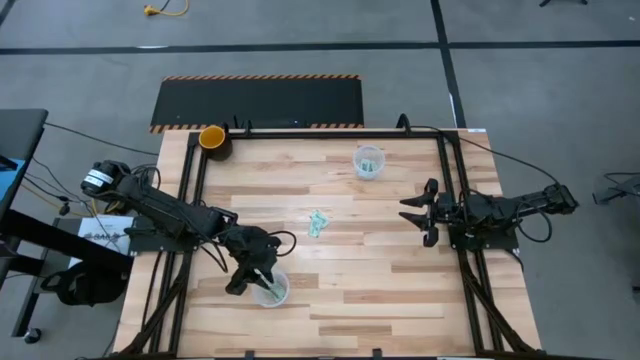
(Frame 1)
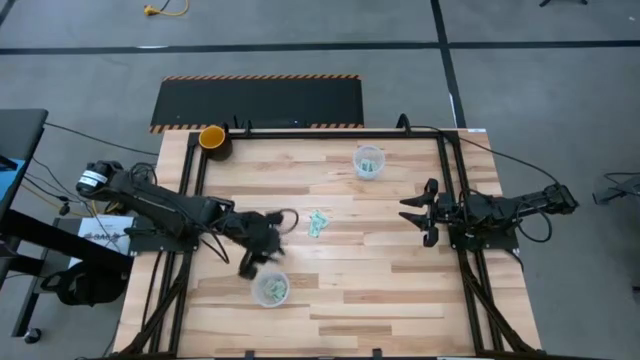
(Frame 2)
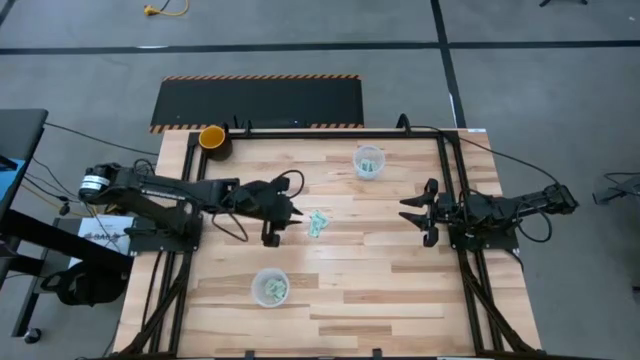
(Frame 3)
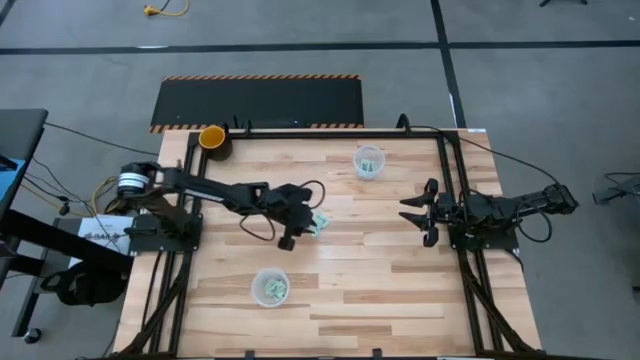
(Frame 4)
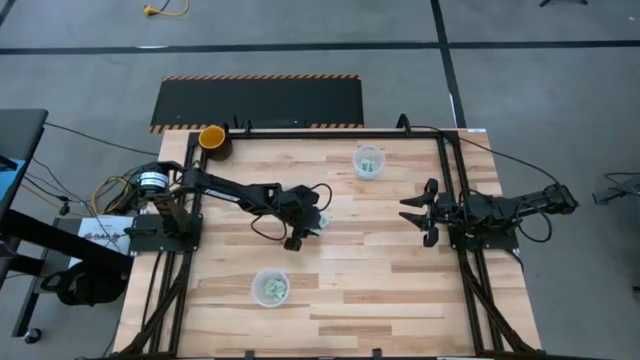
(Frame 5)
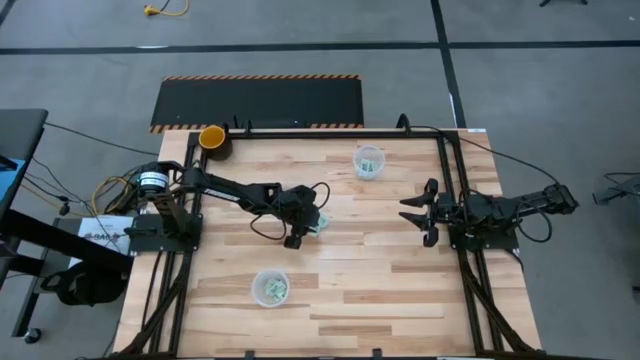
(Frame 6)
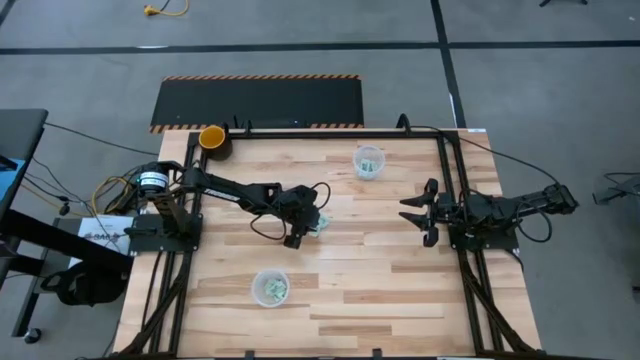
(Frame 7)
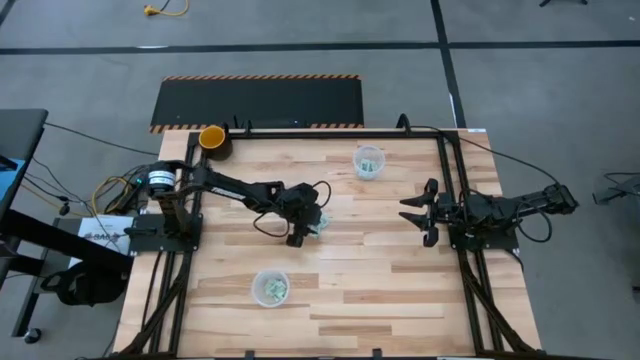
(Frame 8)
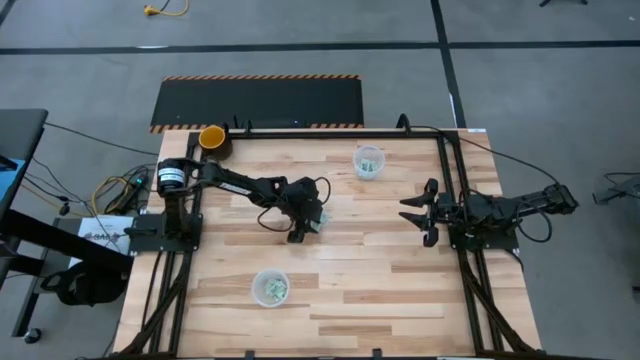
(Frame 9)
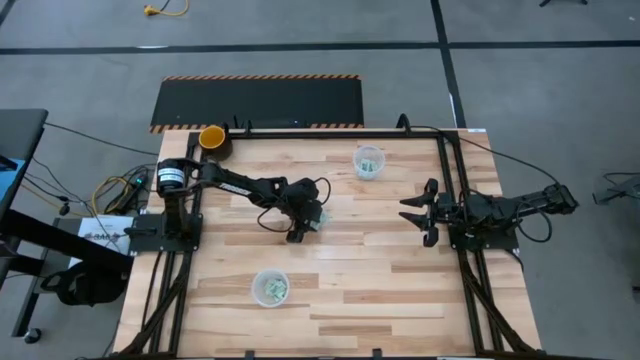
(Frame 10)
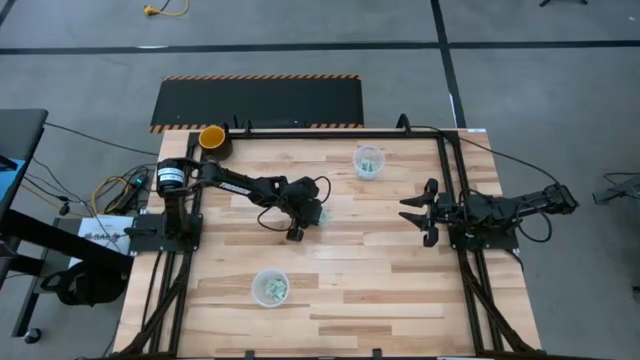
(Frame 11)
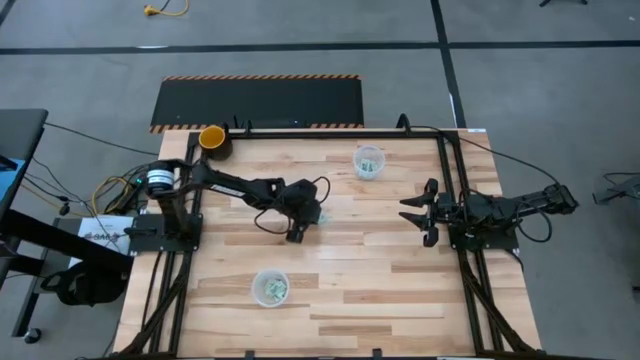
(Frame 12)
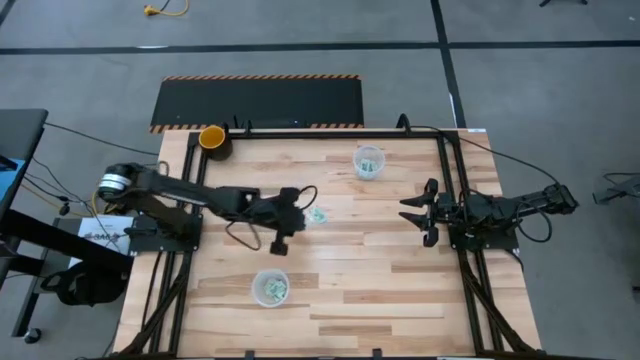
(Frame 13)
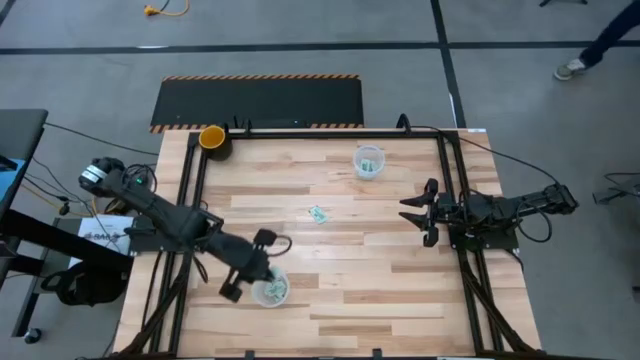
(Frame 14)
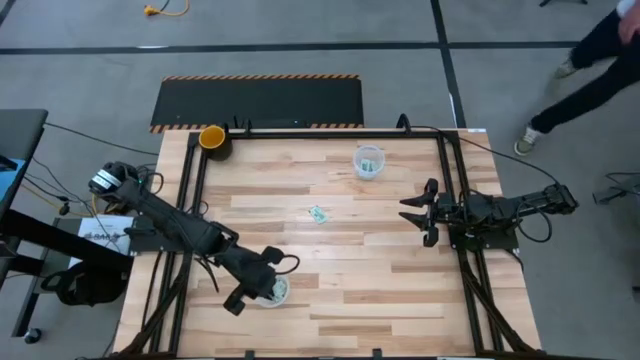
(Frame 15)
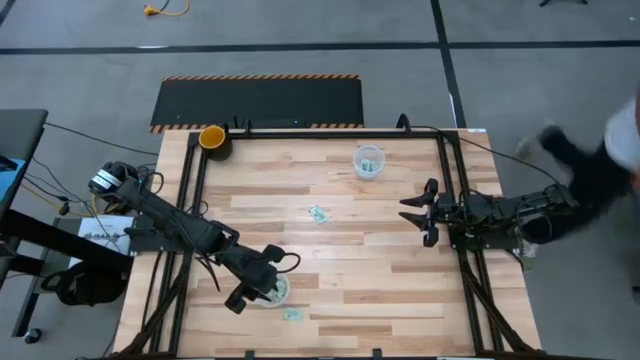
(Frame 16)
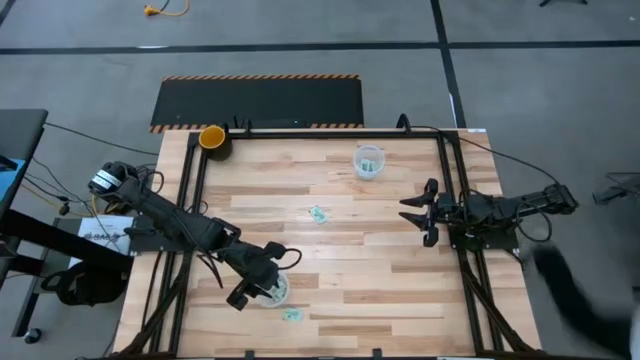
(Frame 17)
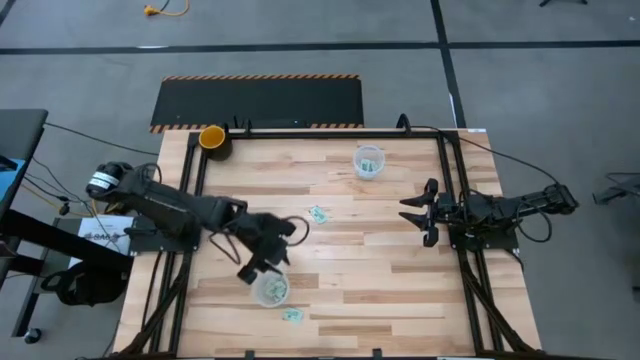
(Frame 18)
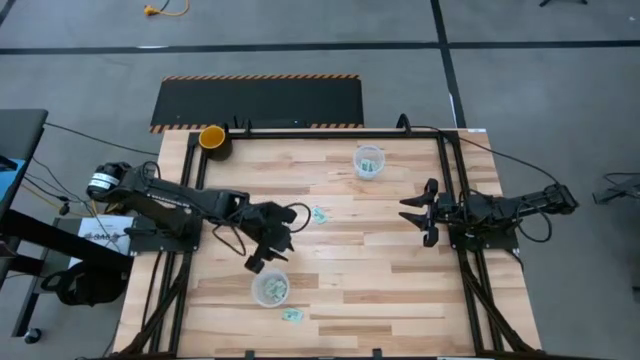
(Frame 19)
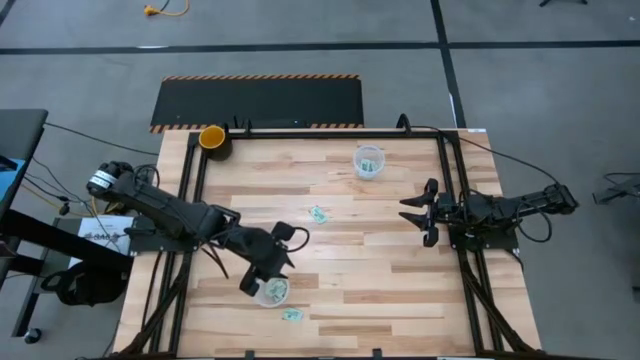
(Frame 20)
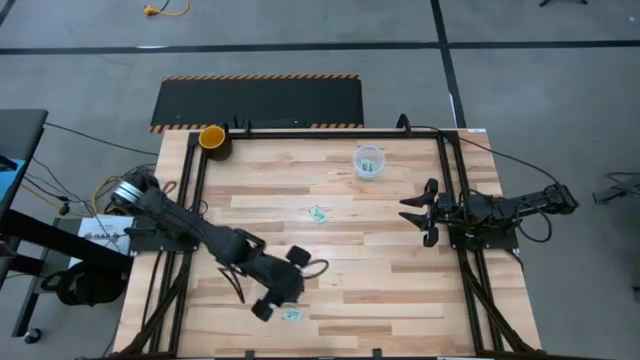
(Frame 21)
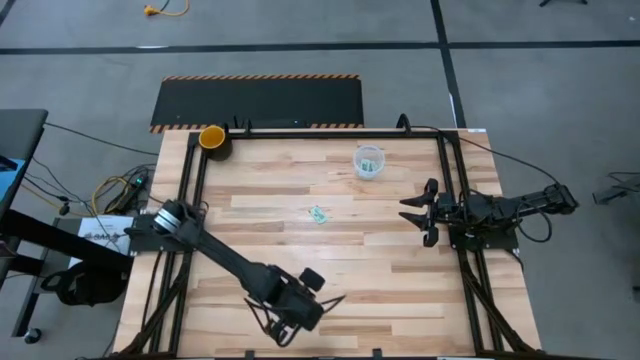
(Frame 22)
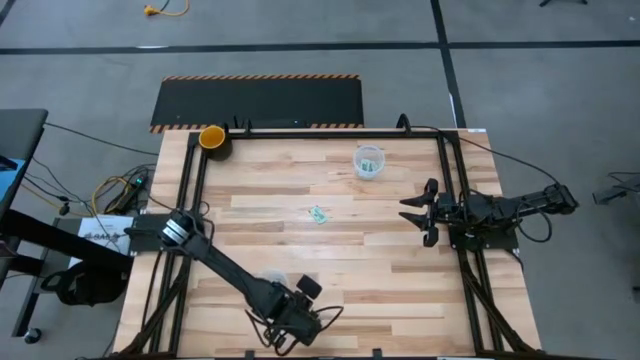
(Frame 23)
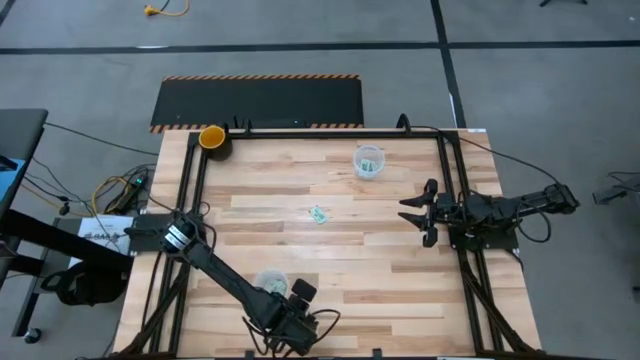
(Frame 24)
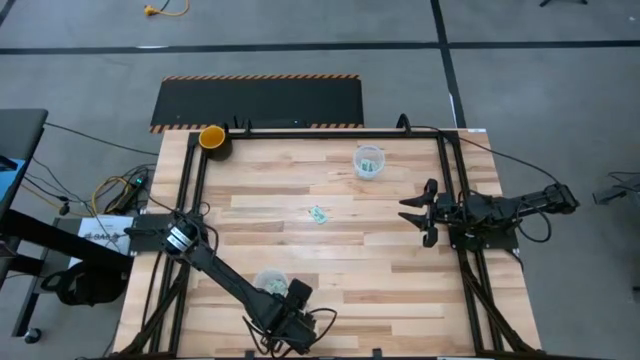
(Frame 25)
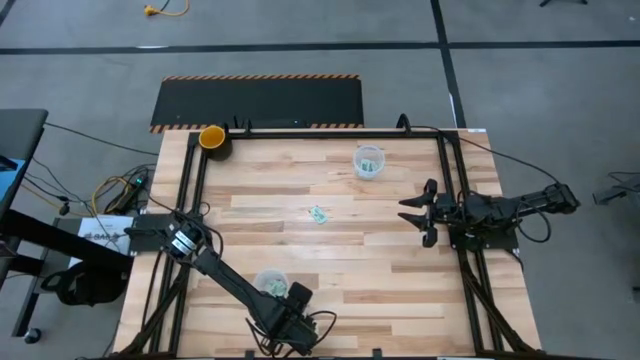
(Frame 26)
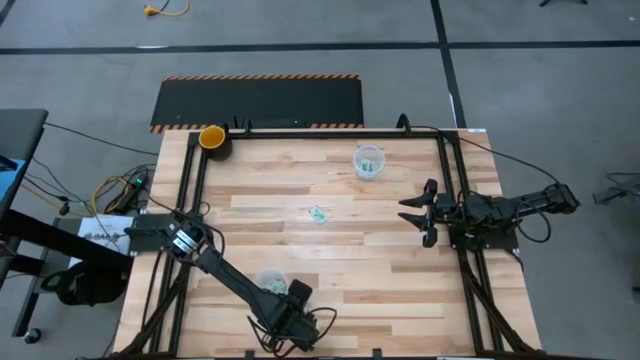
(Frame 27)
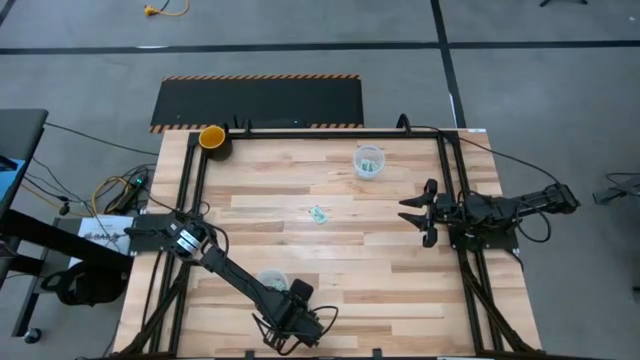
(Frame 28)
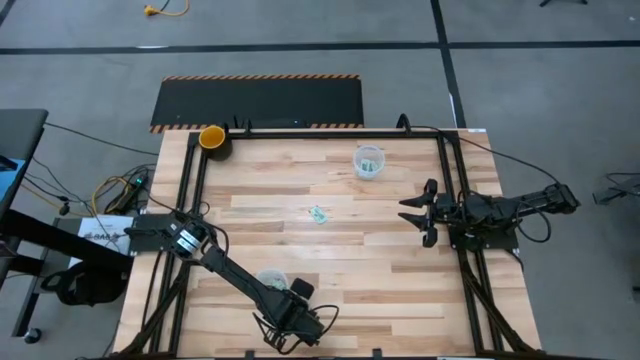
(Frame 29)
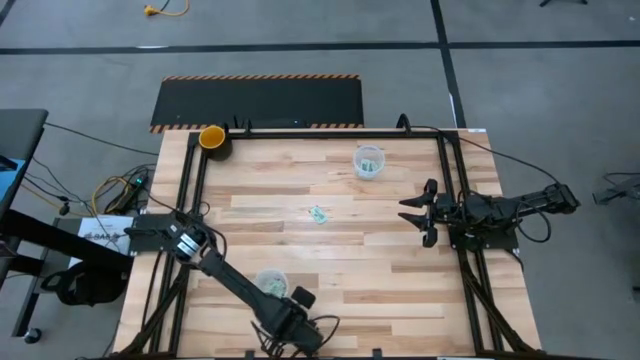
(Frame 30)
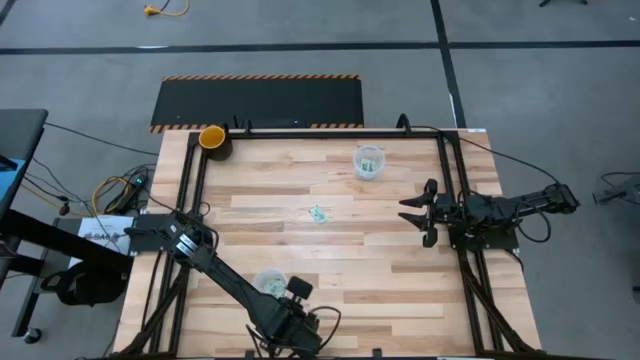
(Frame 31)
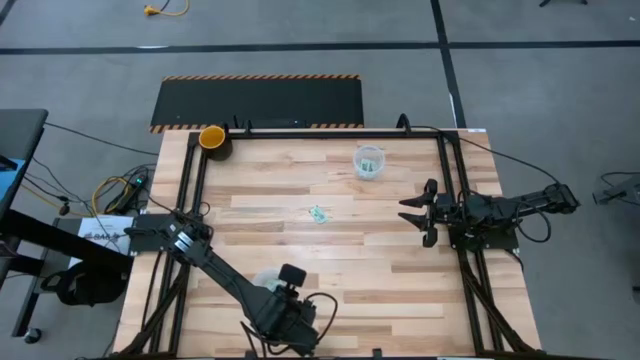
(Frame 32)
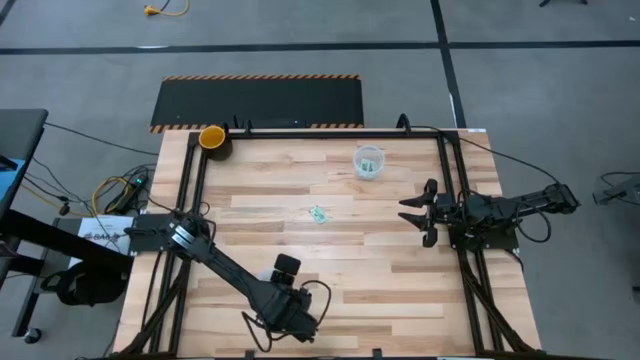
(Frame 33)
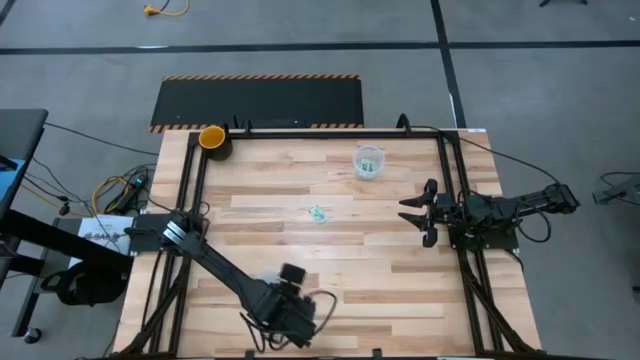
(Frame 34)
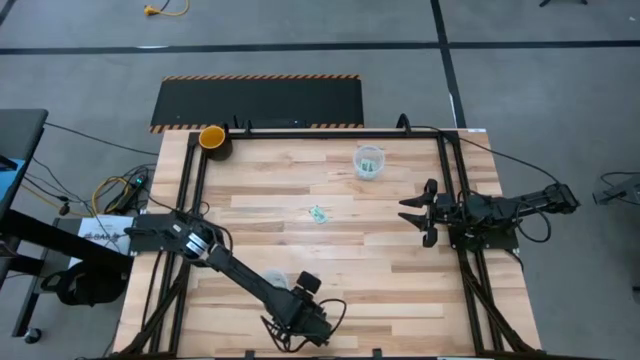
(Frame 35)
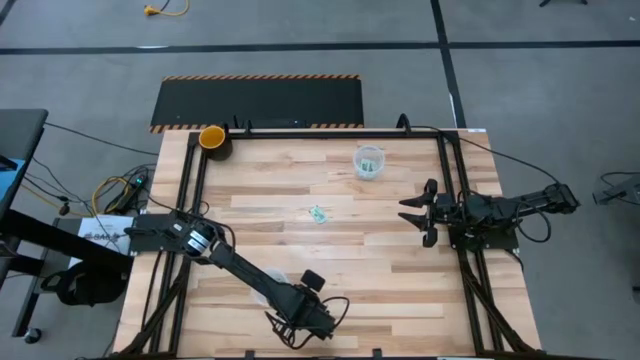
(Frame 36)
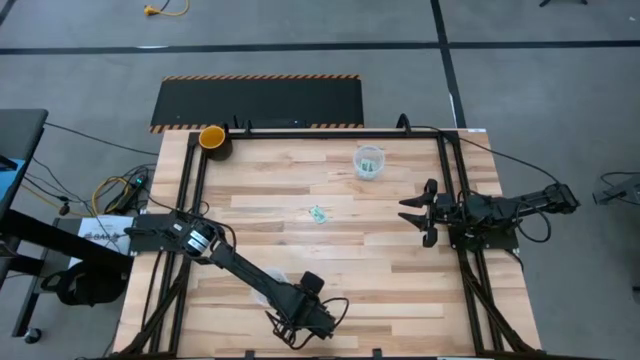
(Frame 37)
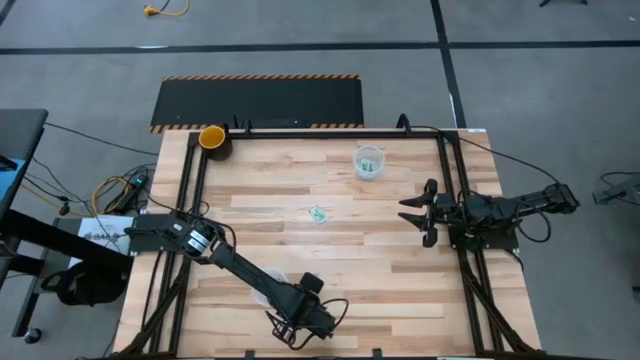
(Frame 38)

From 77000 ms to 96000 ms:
Task: Pick and place Stevia / Truvia into bins
Put the stevia packet into the bottom container

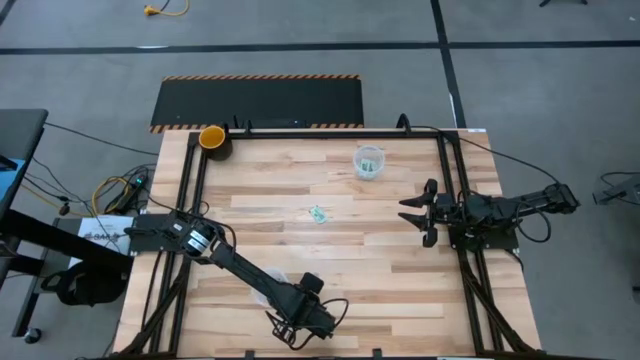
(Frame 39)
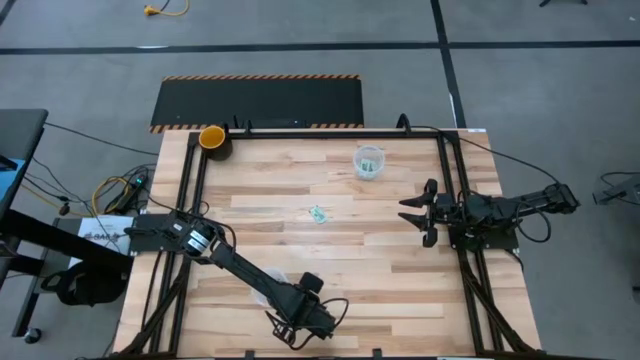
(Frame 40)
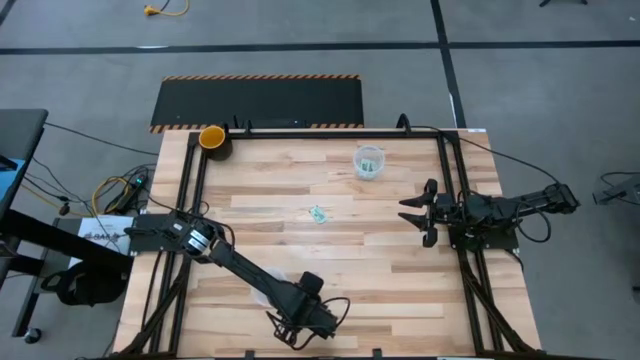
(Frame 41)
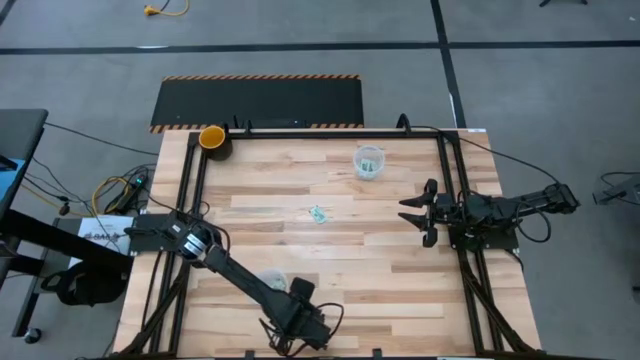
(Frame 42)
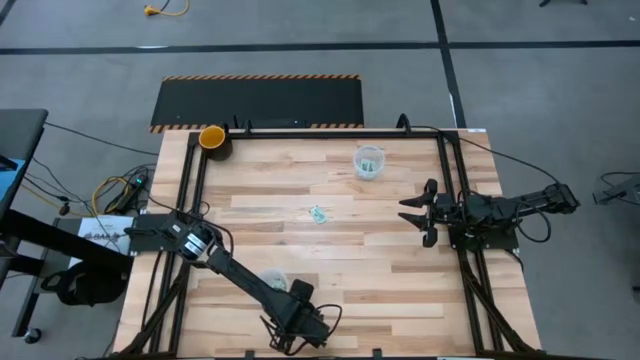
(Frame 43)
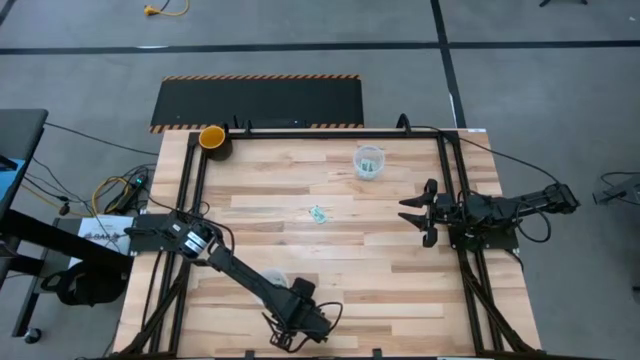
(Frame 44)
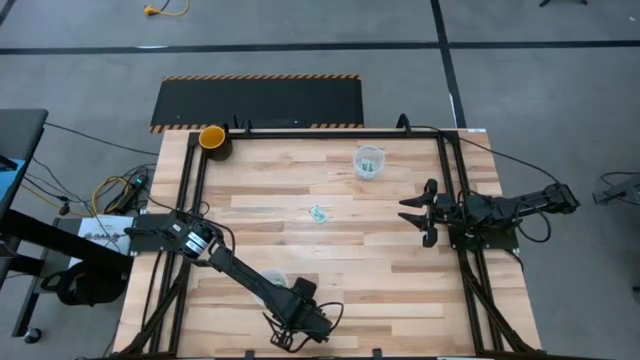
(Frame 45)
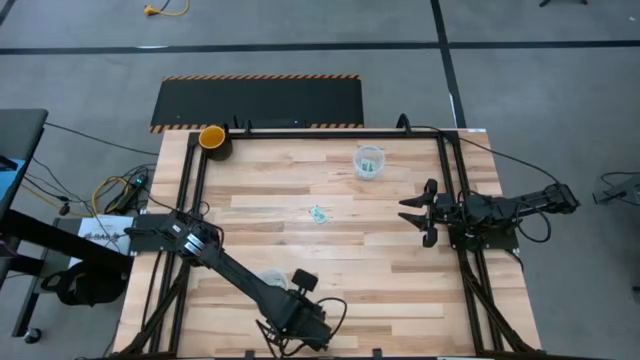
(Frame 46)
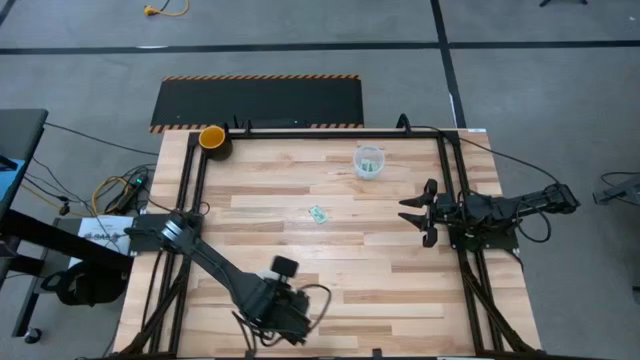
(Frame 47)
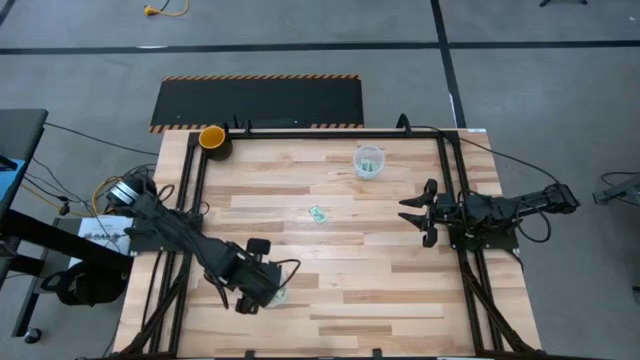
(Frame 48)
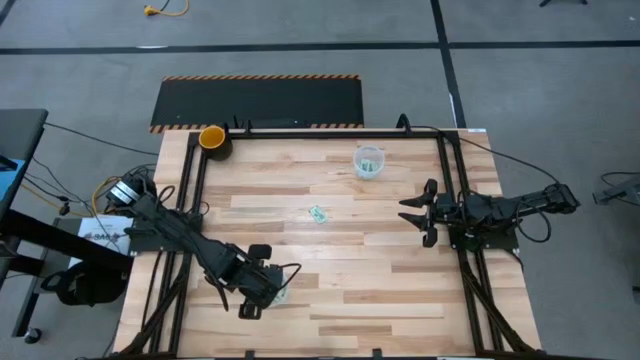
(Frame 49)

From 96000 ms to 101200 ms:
Put the stevia packet into the bottom container
